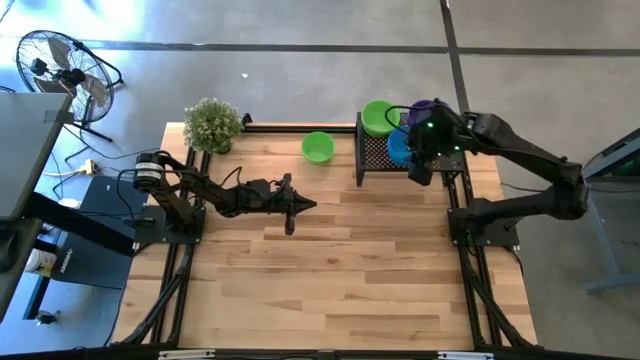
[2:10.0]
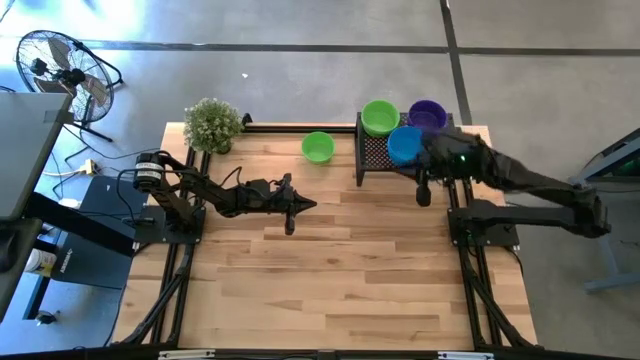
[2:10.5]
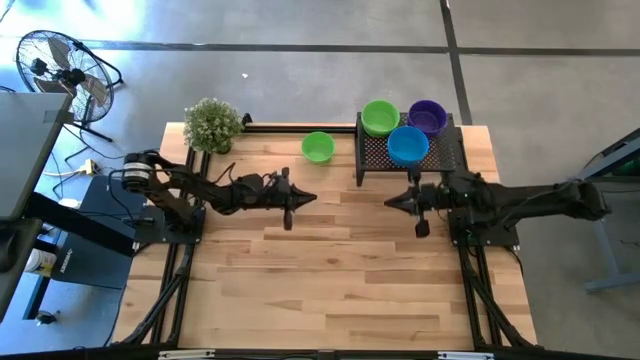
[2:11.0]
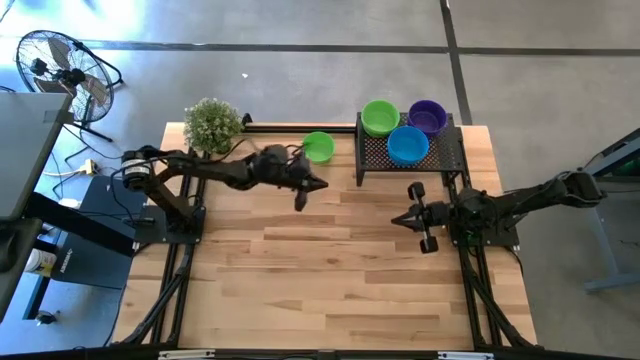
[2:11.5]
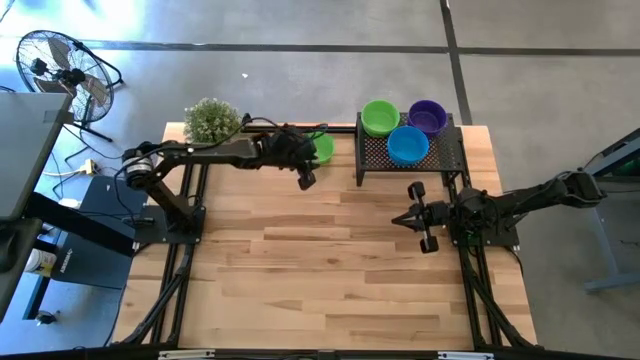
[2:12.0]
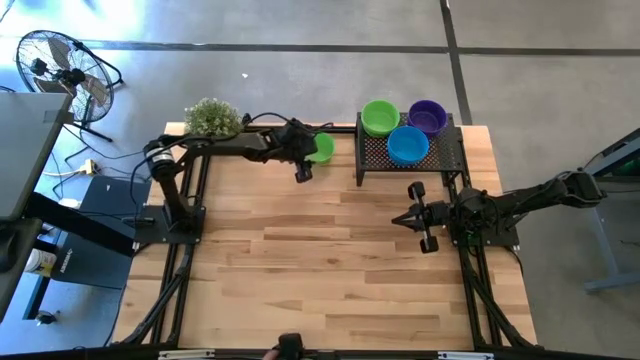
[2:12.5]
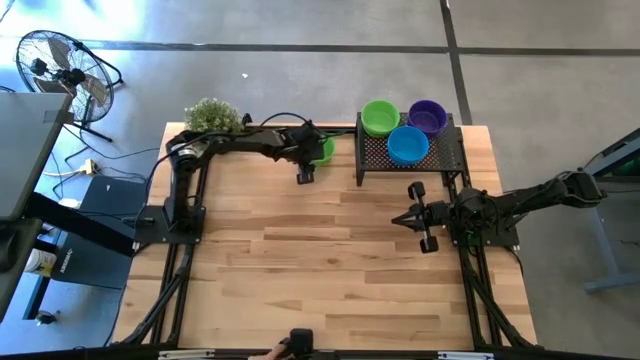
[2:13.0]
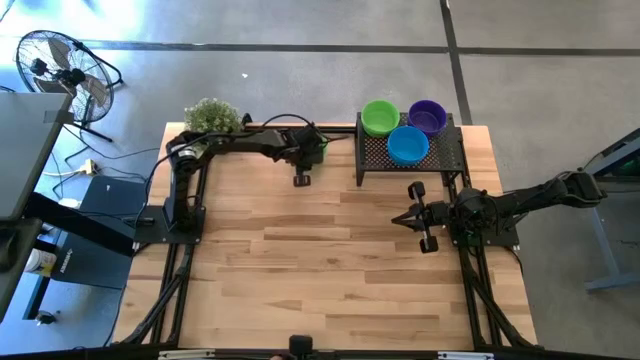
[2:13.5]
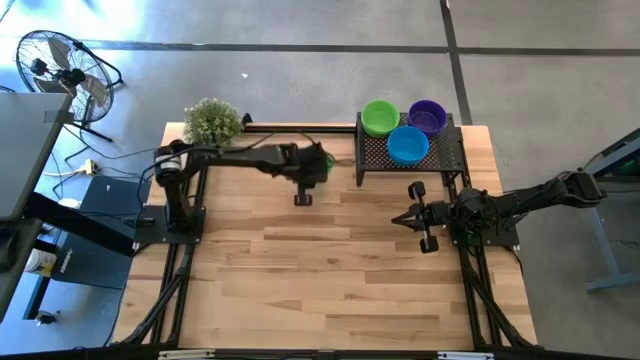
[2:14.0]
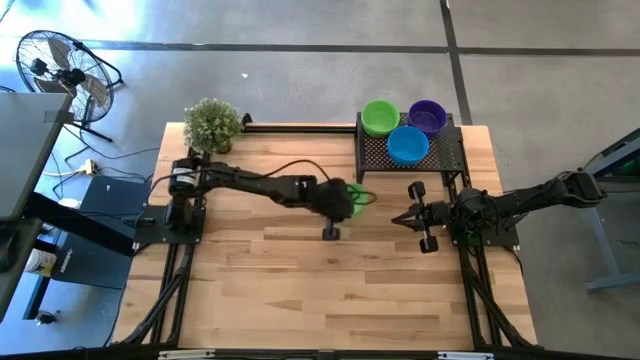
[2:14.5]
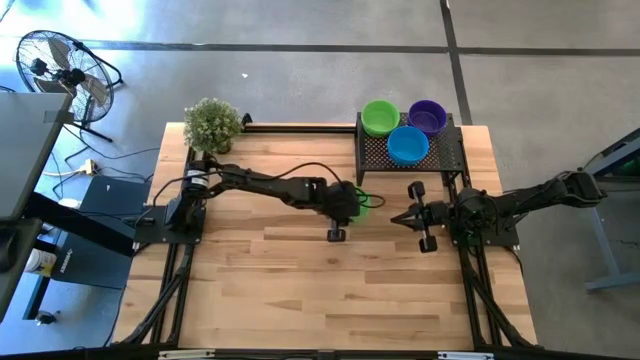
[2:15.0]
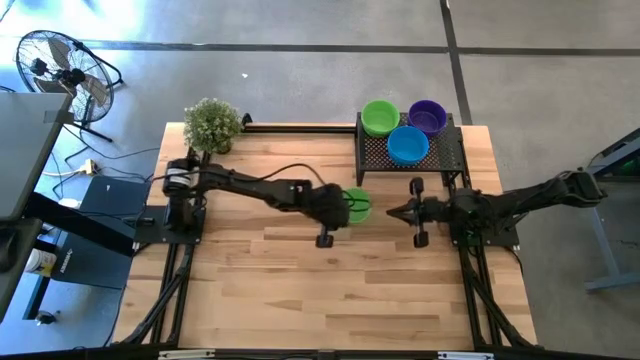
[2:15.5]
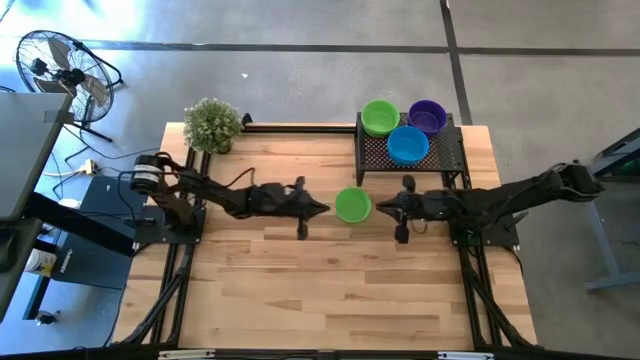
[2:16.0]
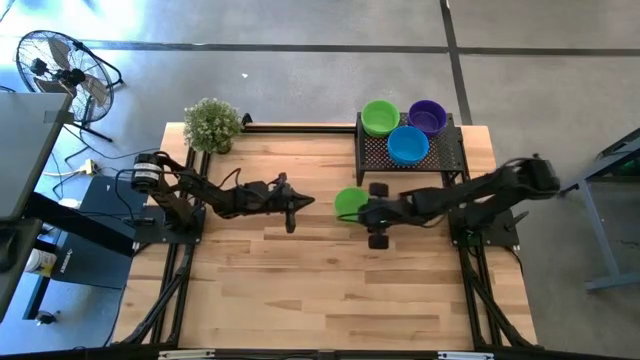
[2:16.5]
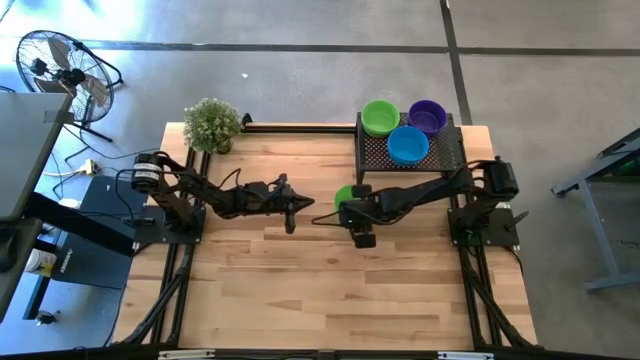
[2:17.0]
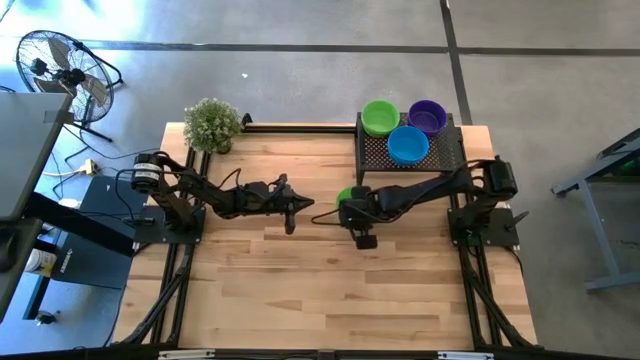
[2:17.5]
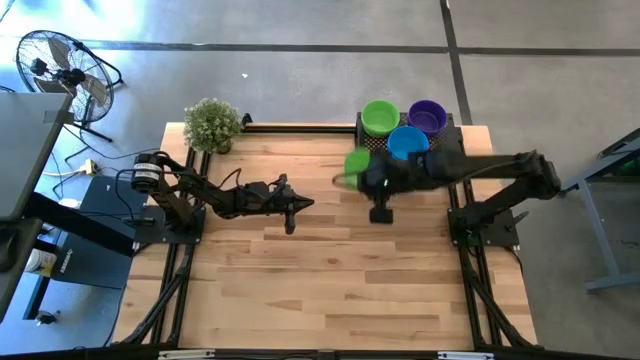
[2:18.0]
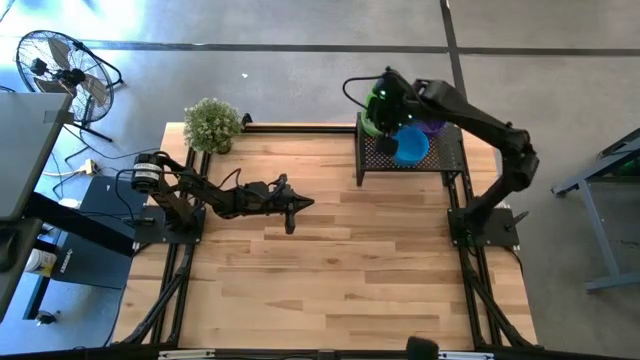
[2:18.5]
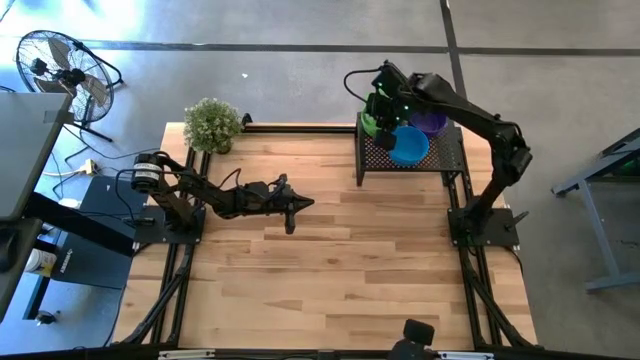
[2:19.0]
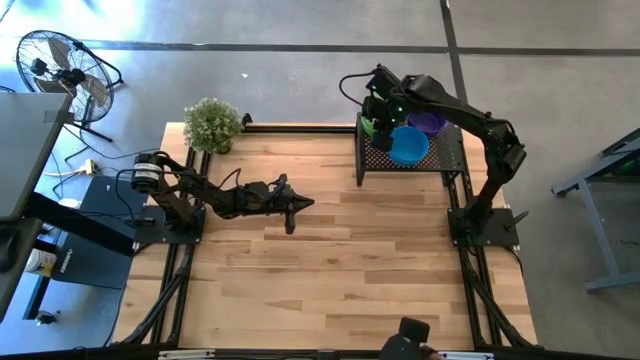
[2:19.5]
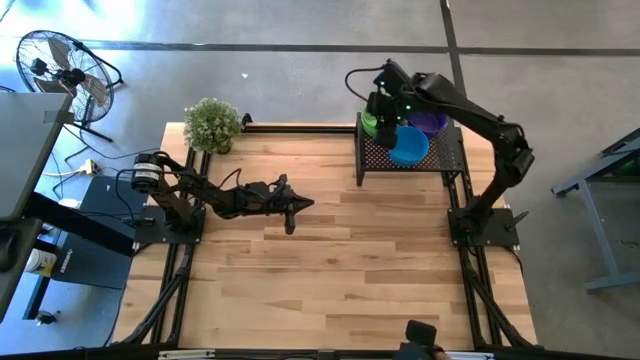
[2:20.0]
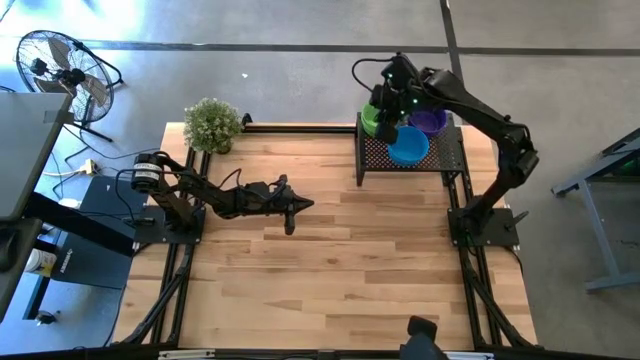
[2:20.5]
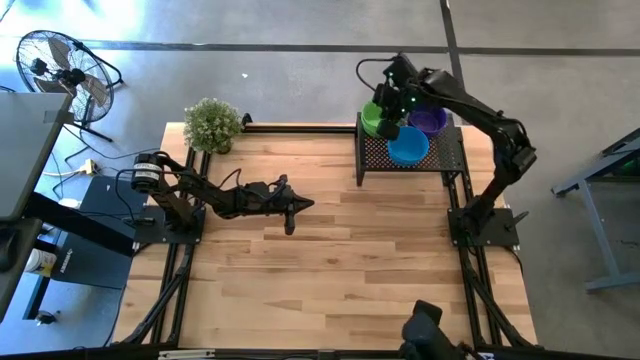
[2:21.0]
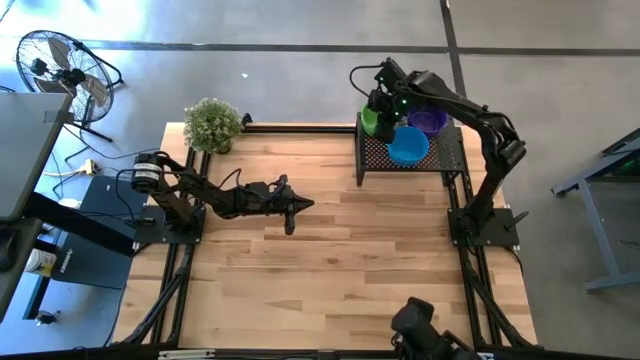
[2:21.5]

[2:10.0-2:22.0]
Task: Pick & Place Mini bowls
Stack the green bowl on the other green bowls on the shelf

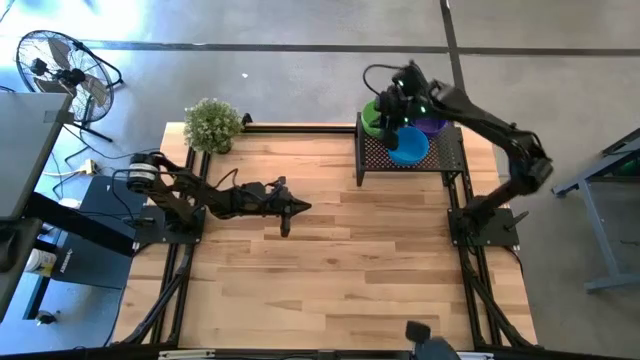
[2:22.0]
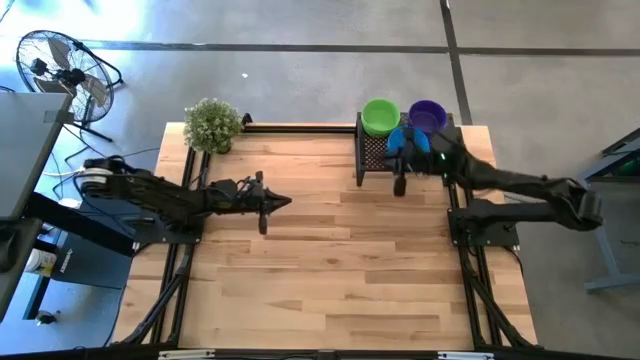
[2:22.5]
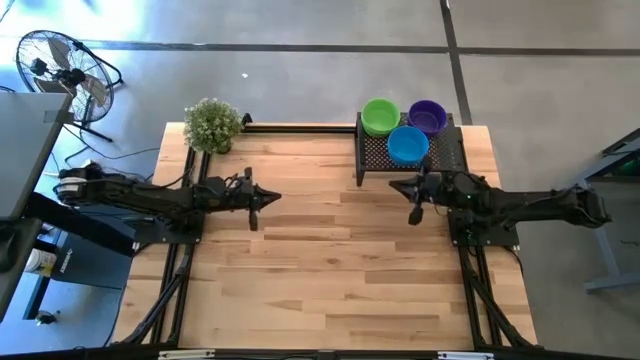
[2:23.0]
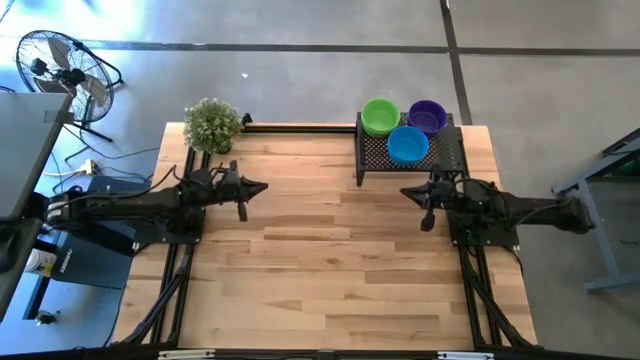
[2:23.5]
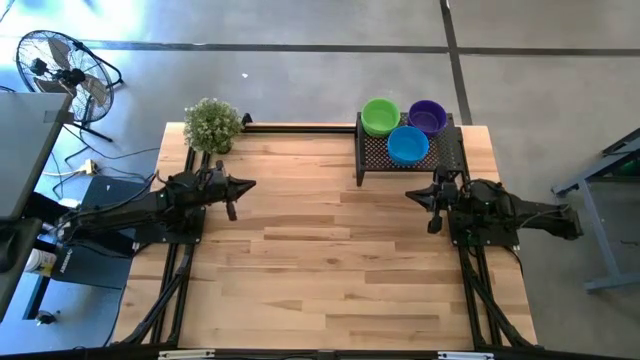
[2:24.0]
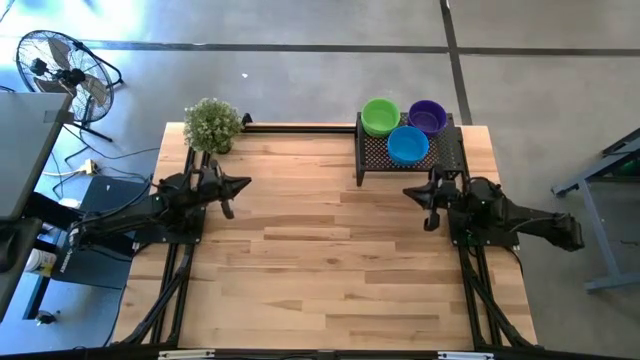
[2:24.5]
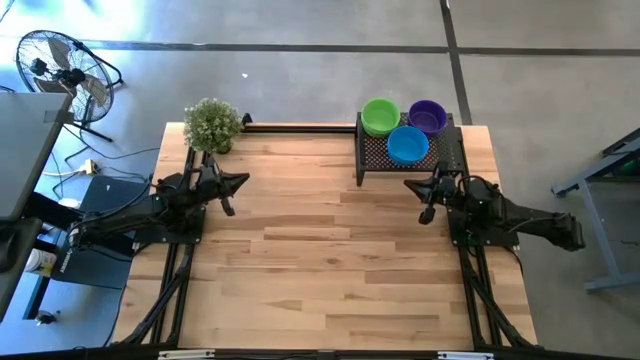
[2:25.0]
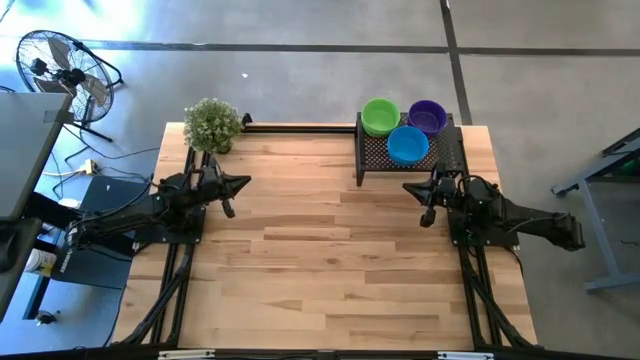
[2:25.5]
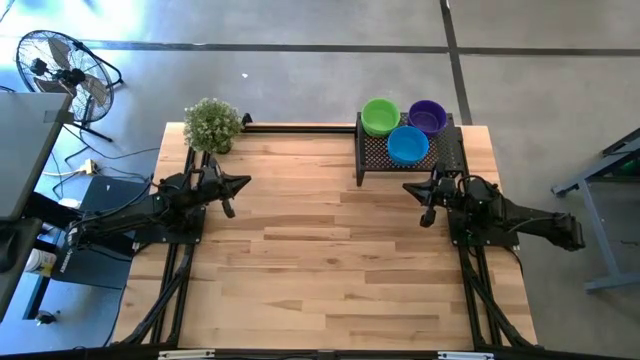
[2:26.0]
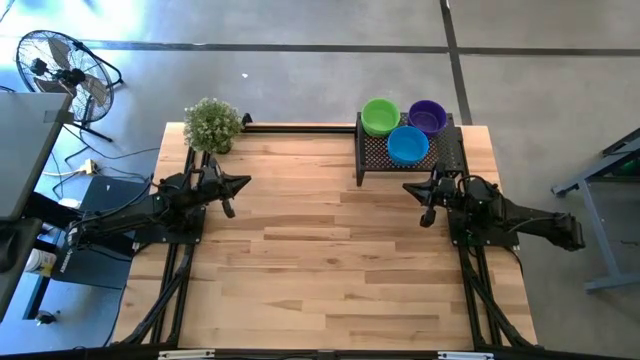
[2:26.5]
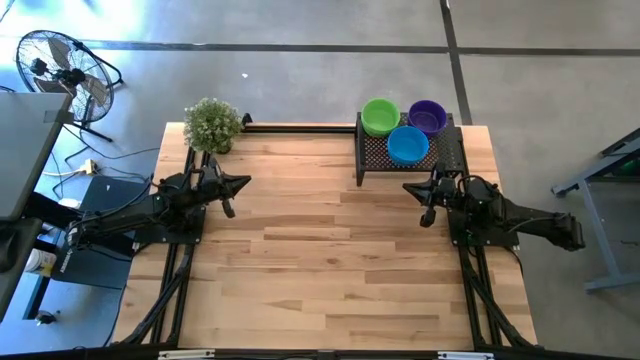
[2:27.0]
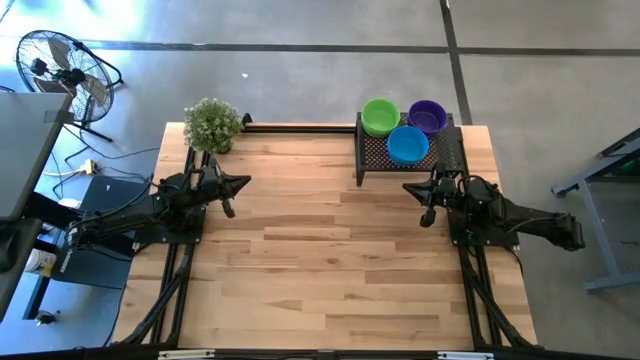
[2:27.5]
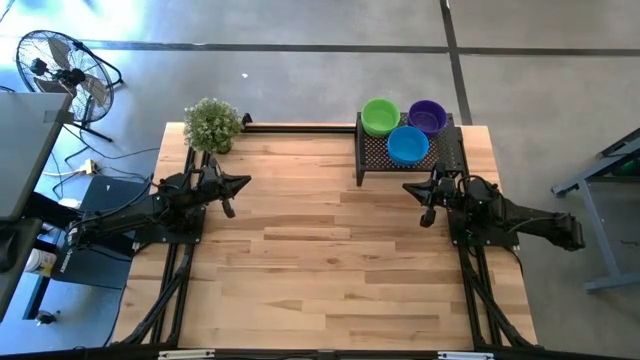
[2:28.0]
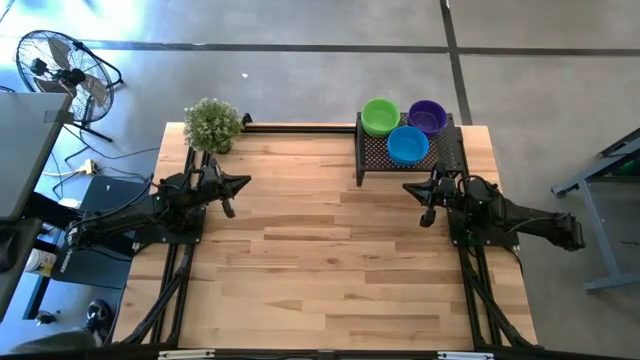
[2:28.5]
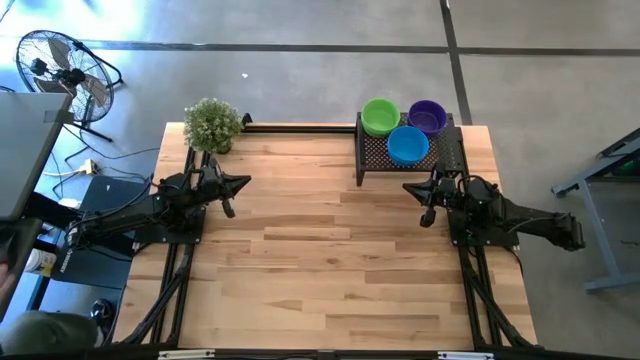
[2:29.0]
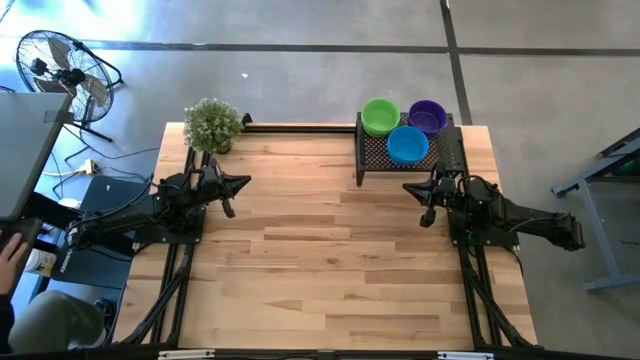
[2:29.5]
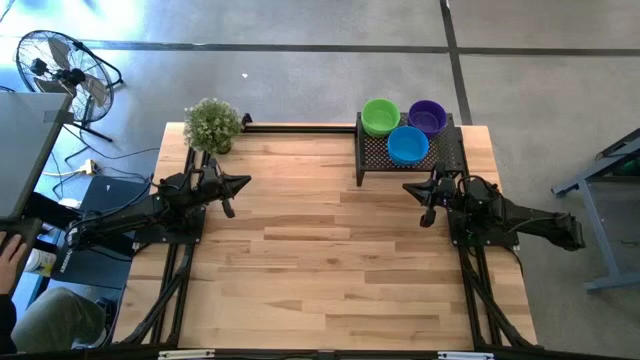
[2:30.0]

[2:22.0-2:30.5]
Return to Home Position
